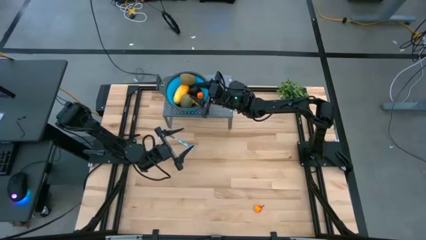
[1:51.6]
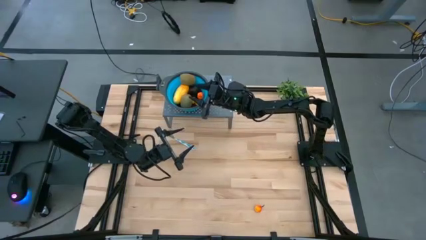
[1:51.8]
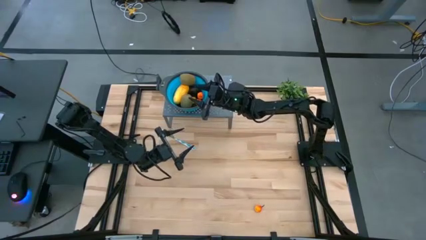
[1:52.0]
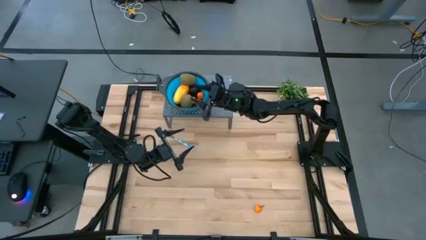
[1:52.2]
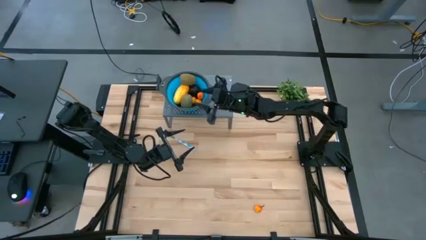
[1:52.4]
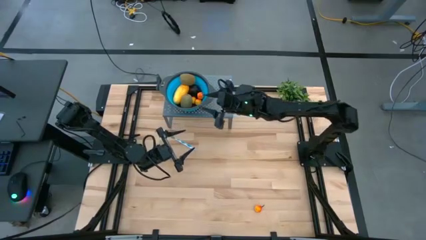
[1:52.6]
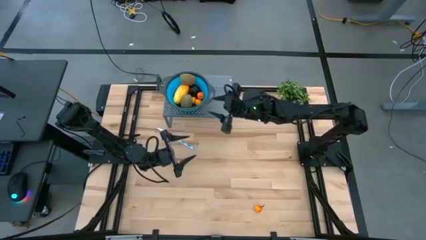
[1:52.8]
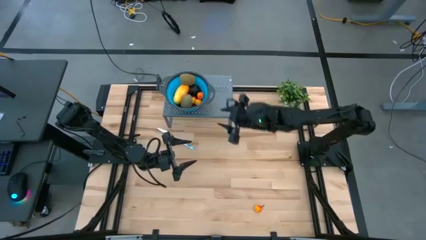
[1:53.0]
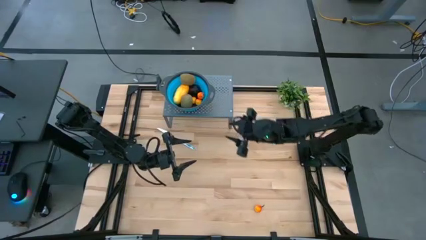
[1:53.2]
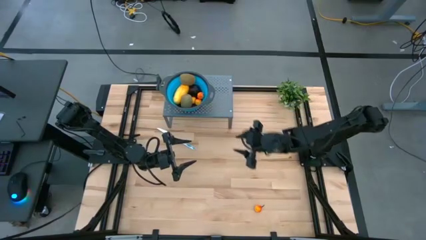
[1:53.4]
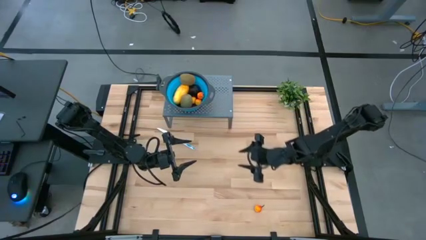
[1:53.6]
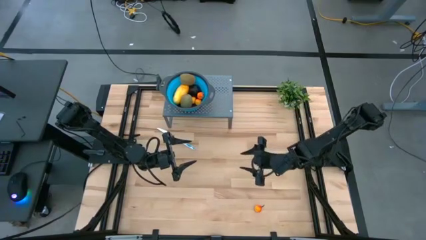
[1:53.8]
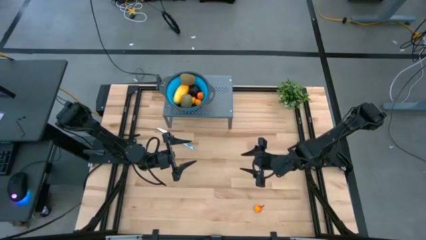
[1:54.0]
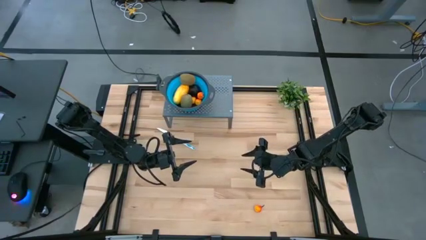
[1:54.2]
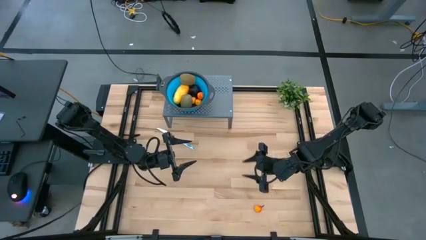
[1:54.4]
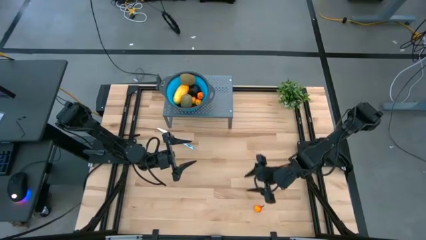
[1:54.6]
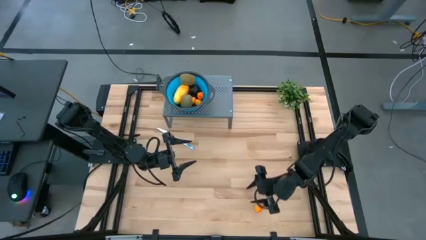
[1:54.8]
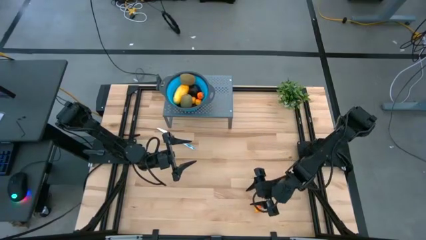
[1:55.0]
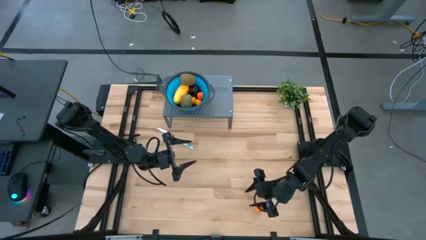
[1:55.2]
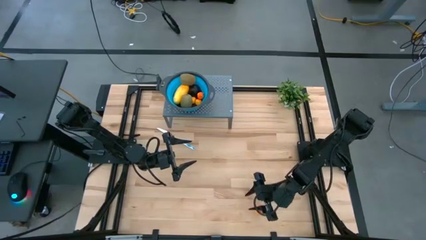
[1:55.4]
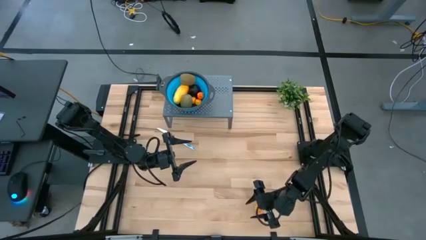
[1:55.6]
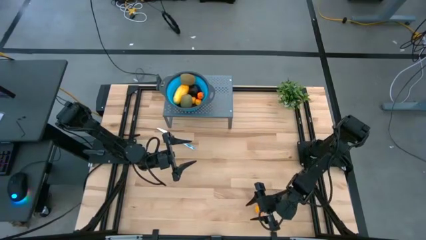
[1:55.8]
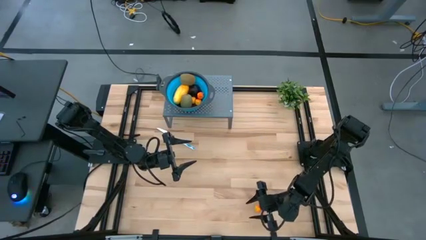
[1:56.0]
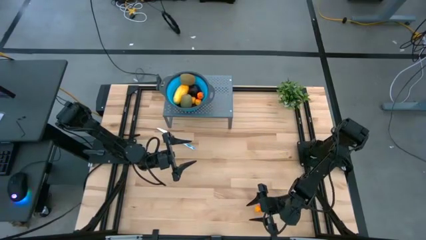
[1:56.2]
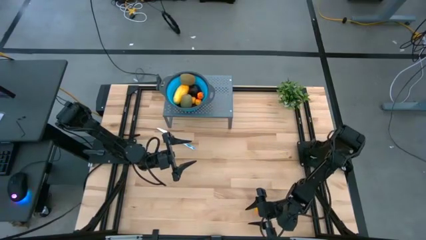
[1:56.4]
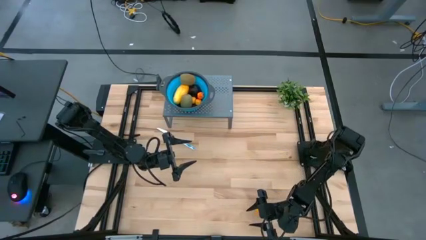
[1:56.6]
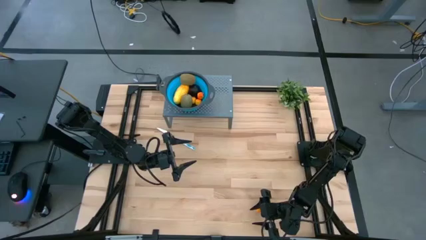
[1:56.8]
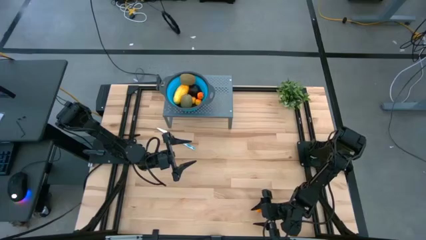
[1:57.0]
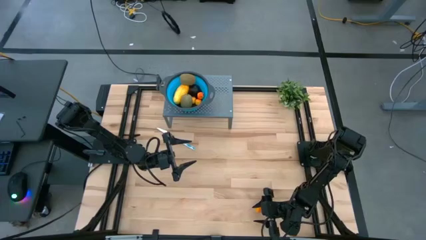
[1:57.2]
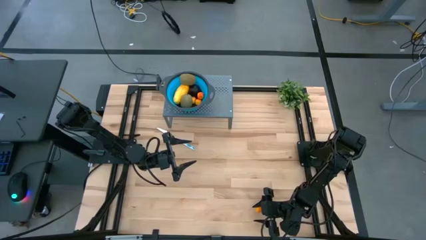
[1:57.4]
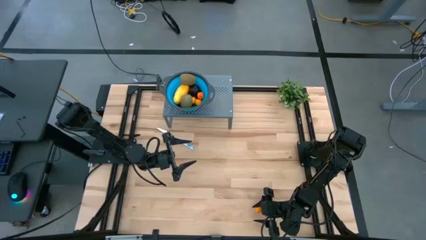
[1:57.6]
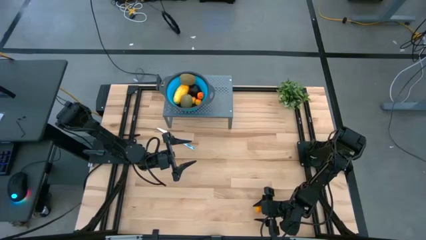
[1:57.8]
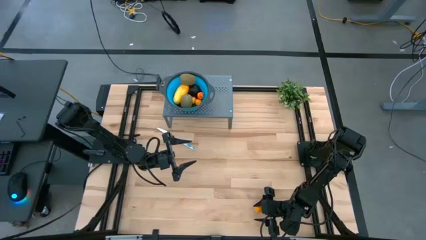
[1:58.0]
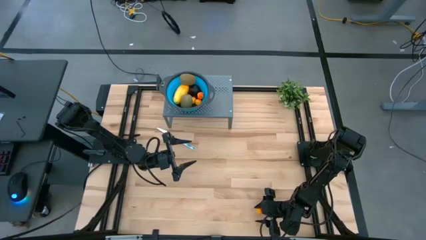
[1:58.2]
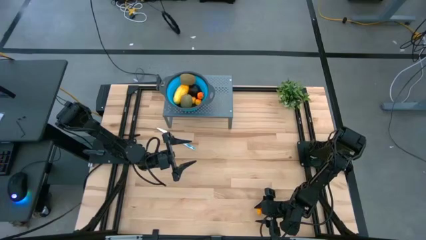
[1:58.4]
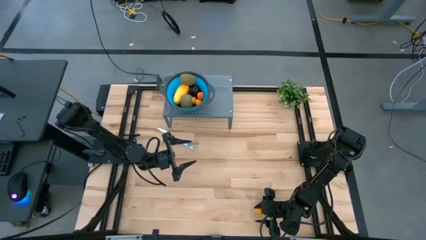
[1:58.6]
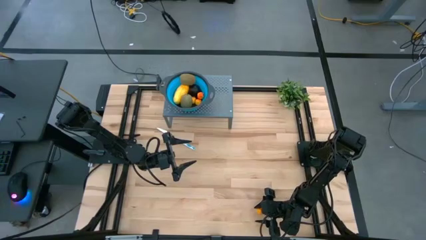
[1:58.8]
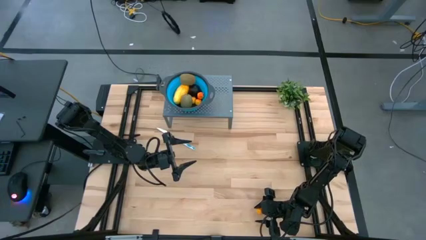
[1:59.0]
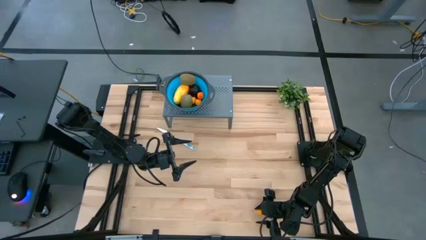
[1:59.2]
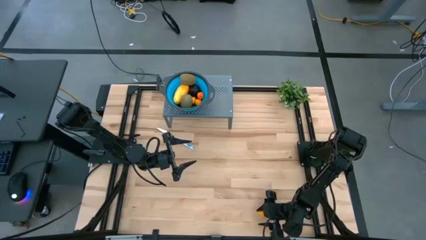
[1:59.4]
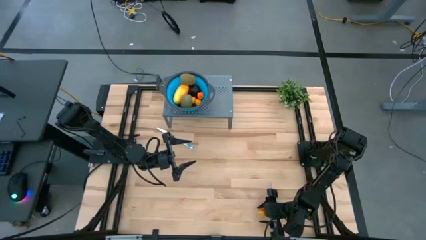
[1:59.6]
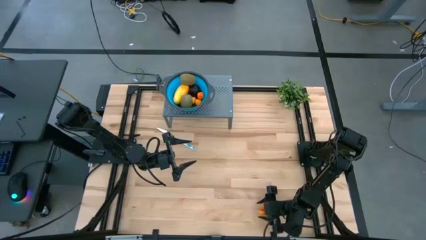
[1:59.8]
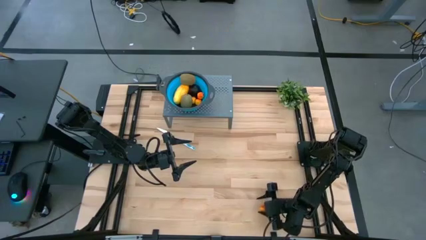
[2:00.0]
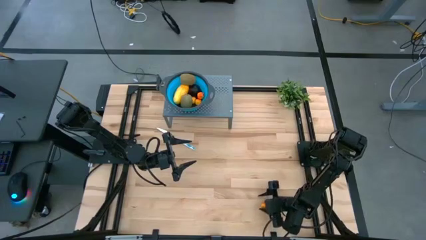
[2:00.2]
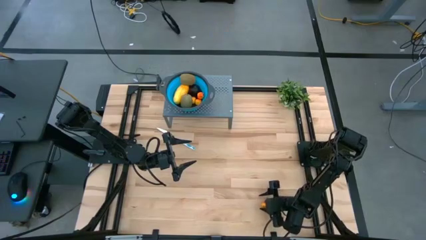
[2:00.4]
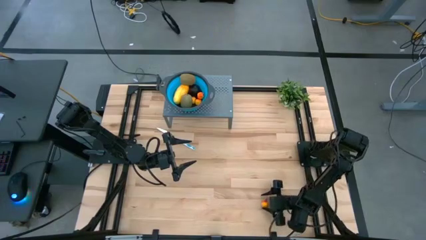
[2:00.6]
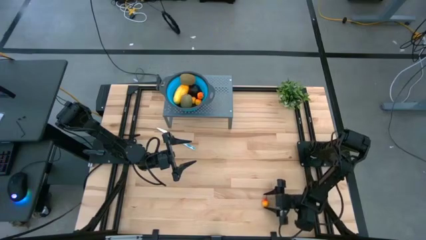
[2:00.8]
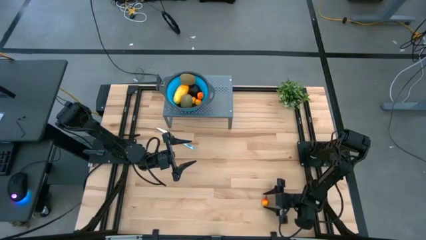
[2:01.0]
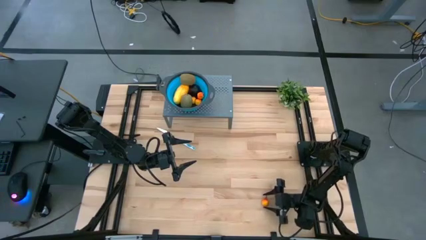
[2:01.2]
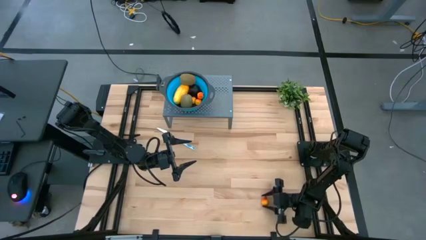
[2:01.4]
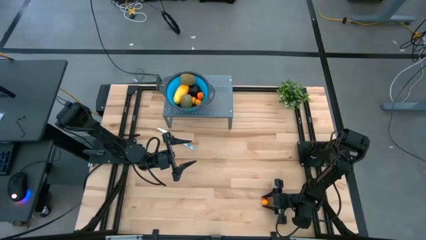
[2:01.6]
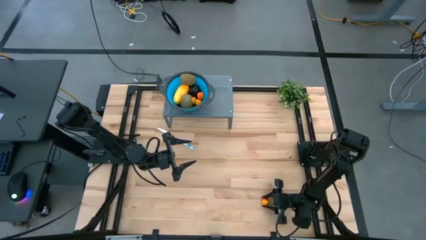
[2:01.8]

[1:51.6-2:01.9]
Task: Pick & Place Fruit
Put the pear into the blue strainer bowl
